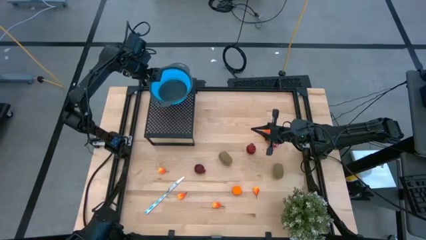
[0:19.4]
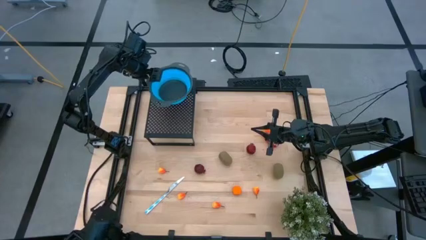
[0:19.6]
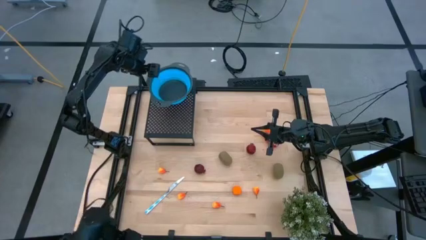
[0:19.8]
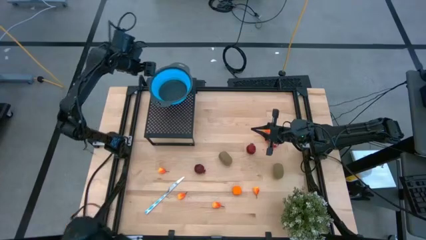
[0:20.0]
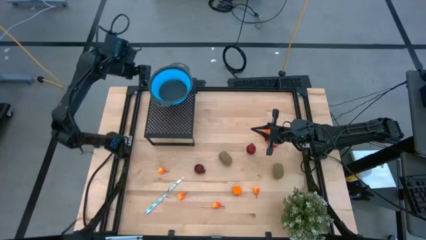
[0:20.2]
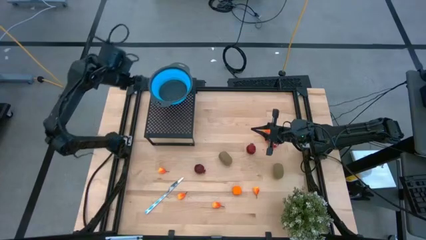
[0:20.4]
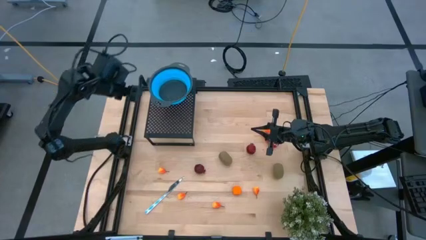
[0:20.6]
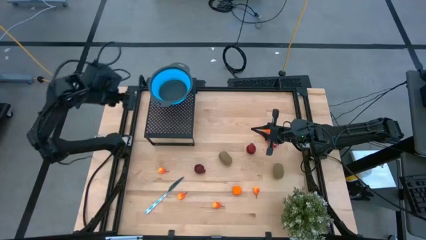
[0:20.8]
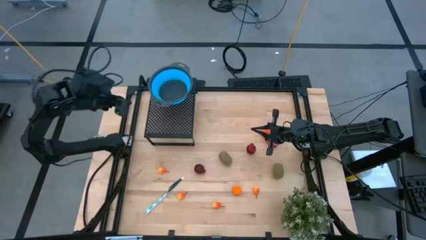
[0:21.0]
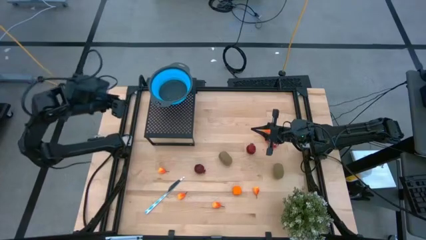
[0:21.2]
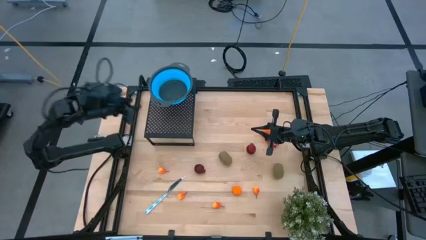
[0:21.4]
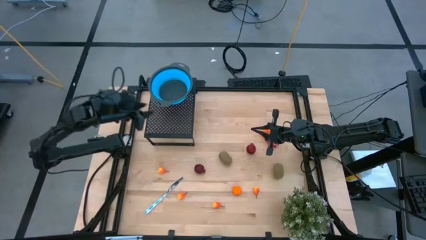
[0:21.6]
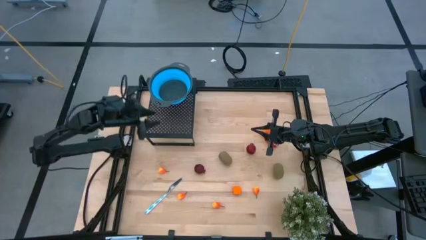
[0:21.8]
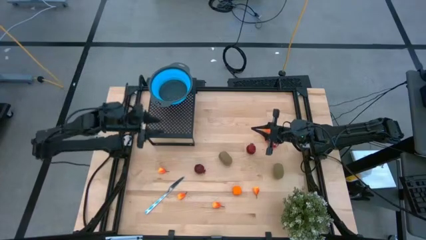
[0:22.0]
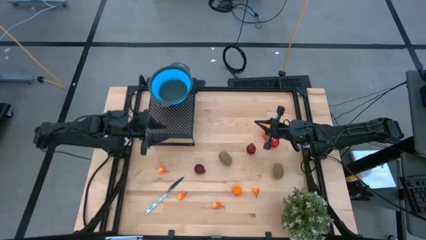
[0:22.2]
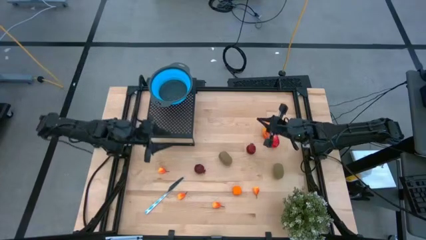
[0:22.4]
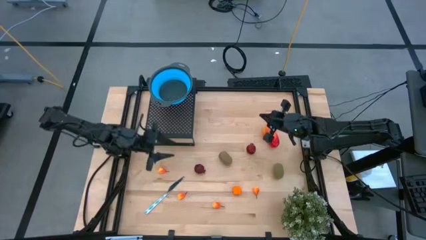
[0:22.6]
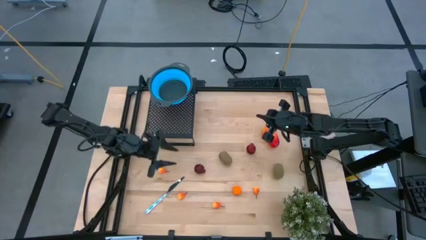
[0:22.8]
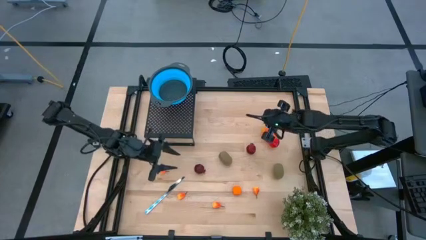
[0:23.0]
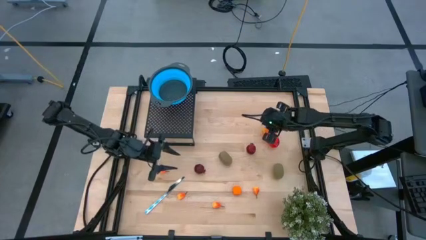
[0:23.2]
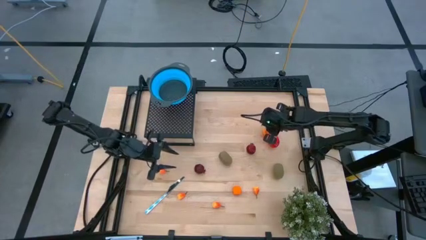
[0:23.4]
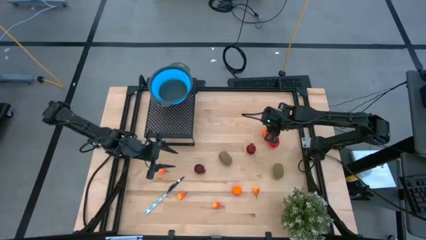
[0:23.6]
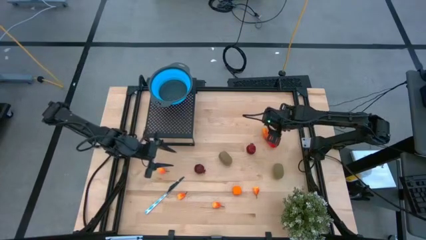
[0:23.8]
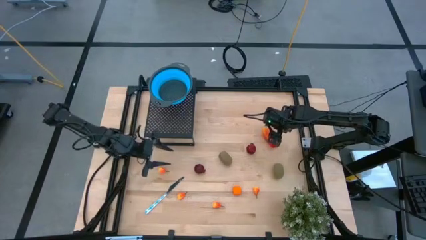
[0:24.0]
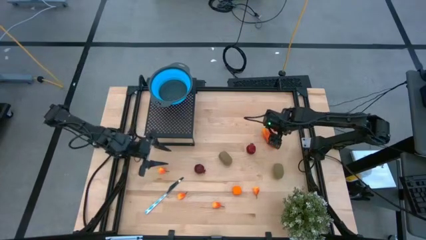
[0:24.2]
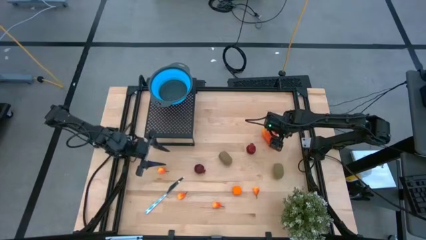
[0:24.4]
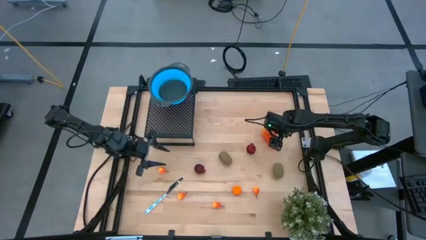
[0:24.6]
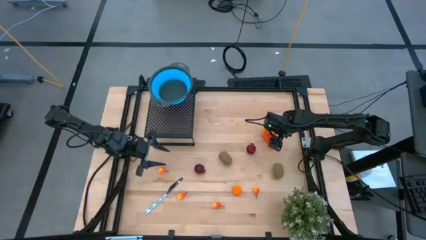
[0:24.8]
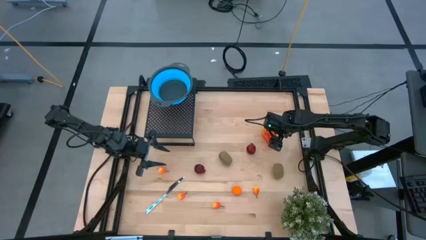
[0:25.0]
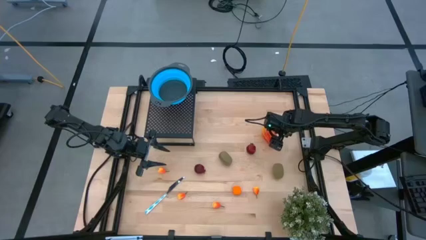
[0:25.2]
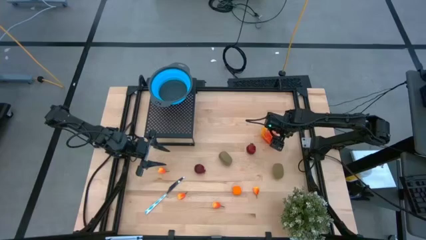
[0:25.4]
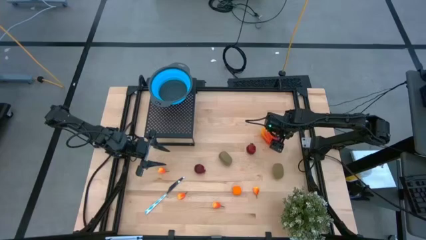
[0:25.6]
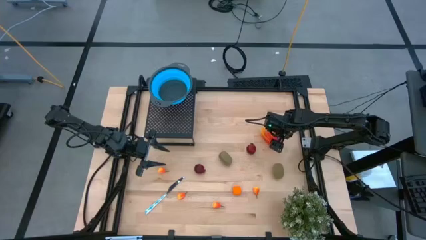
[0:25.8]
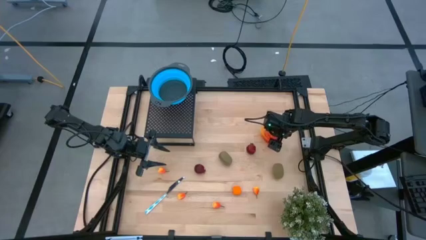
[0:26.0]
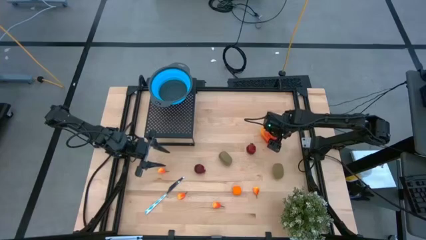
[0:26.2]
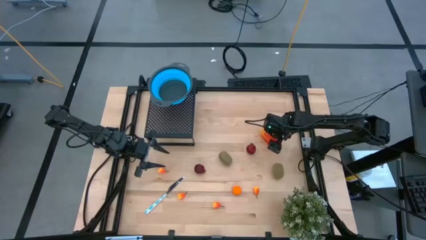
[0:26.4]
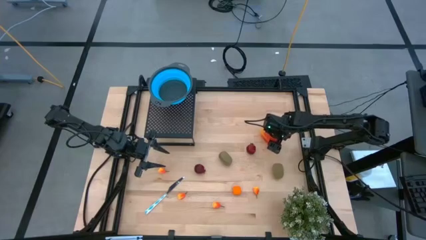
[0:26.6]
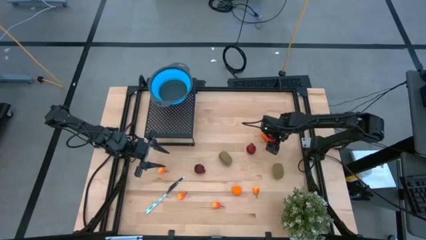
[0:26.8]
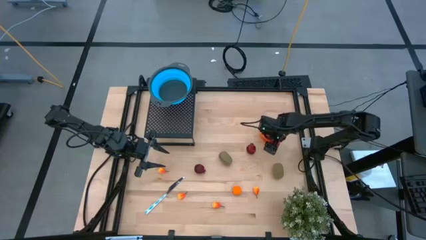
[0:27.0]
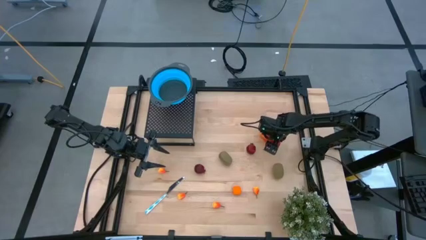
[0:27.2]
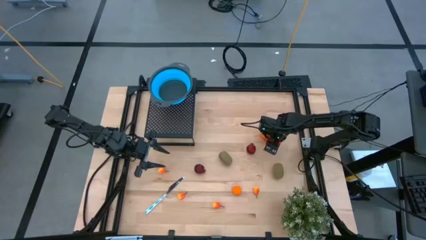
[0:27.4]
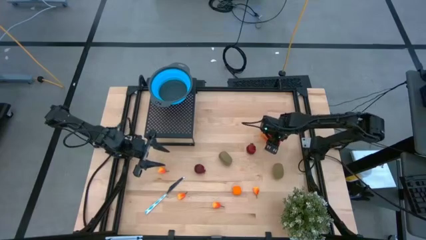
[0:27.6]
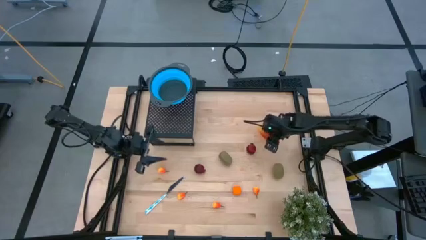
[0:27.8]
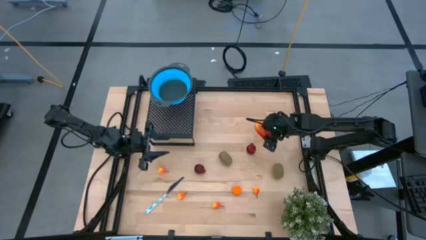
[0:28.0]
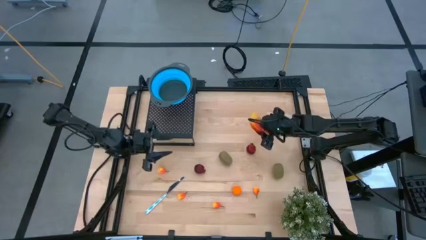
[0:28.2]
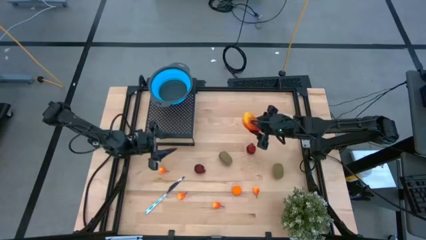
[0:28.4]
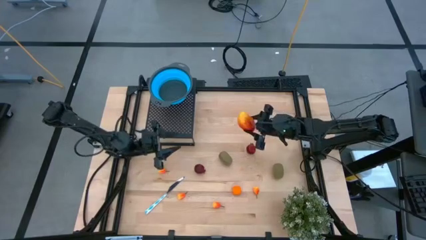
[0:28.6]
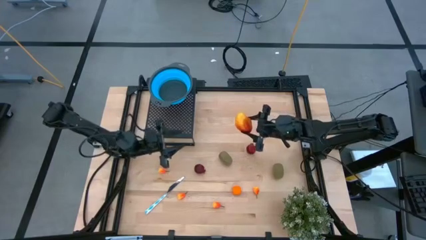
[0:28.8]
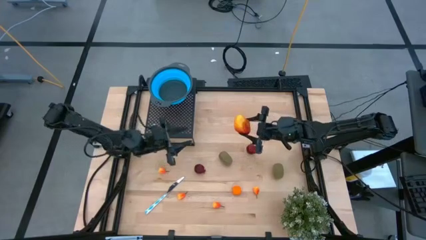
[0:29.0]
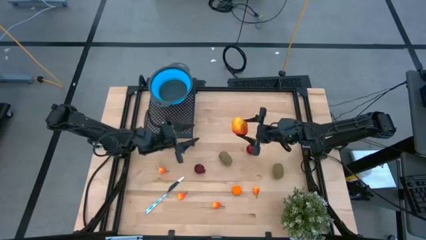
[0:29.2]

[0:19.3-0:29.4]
Task: Pick & Place Fruit
Put the orange mango into the blue strainer bowl on the shelf

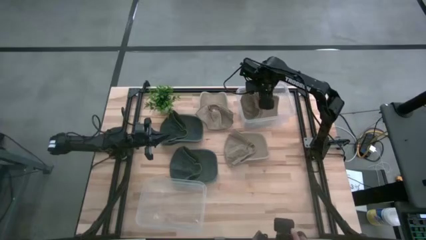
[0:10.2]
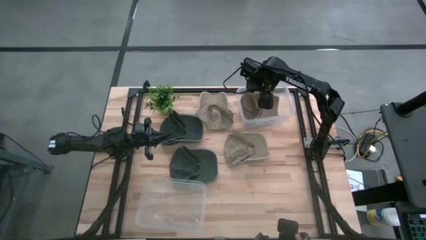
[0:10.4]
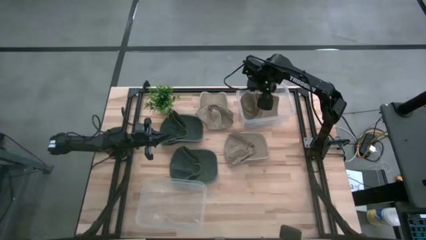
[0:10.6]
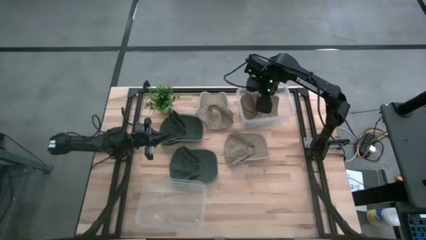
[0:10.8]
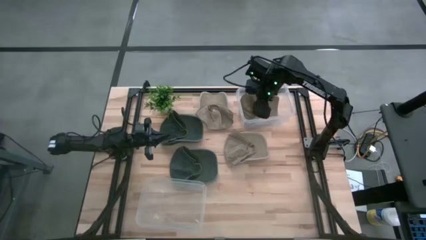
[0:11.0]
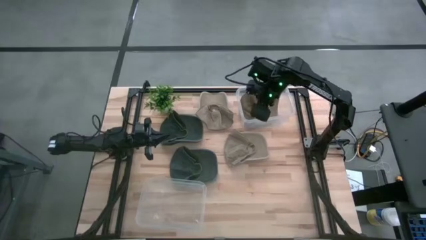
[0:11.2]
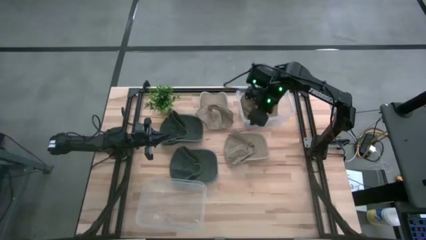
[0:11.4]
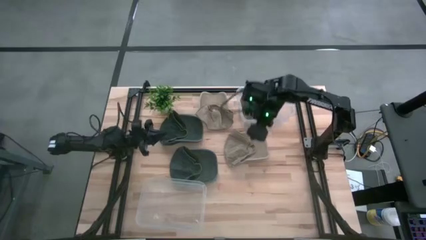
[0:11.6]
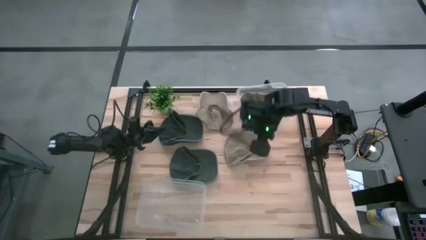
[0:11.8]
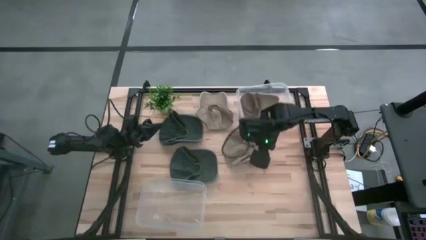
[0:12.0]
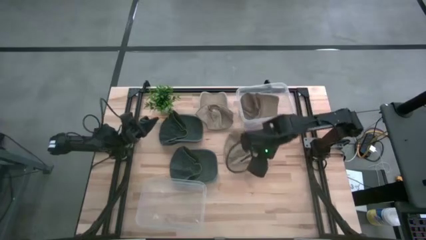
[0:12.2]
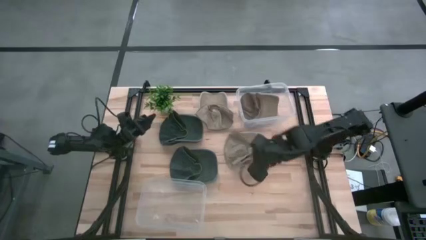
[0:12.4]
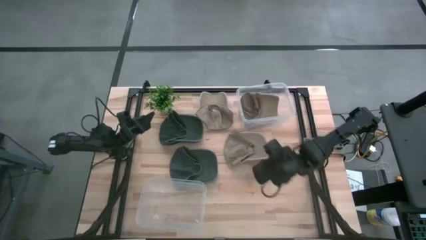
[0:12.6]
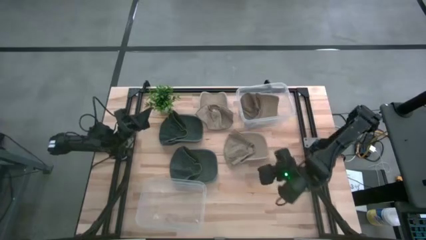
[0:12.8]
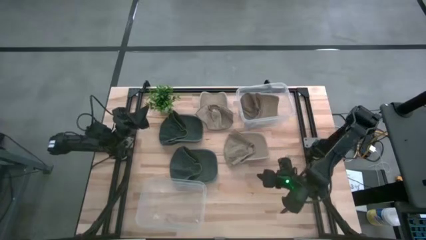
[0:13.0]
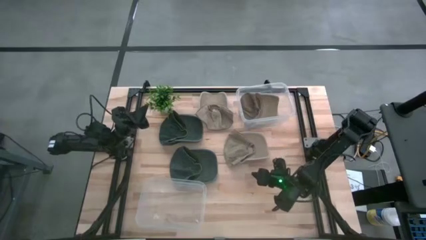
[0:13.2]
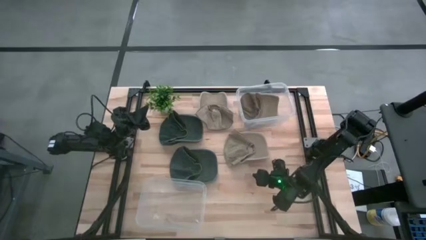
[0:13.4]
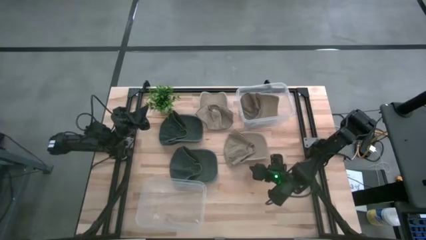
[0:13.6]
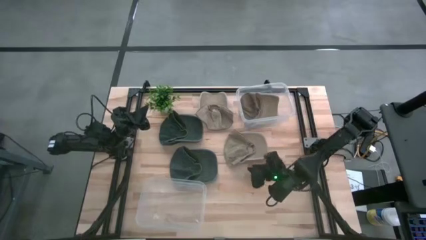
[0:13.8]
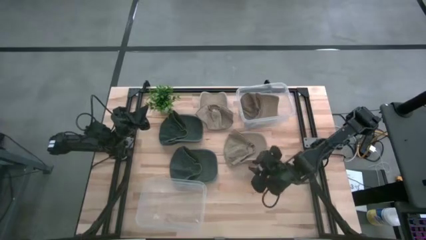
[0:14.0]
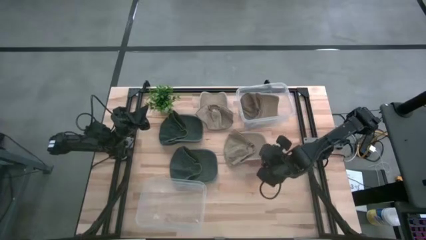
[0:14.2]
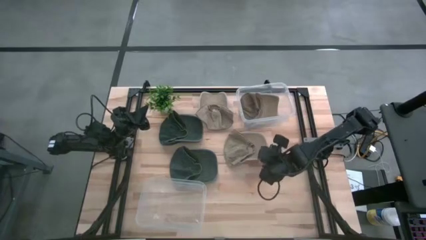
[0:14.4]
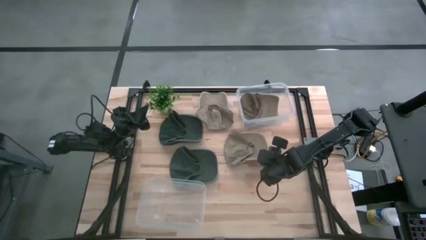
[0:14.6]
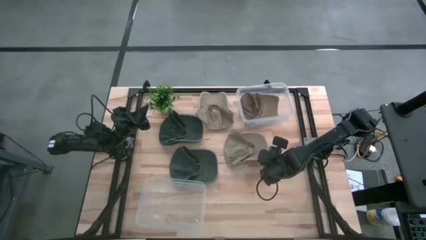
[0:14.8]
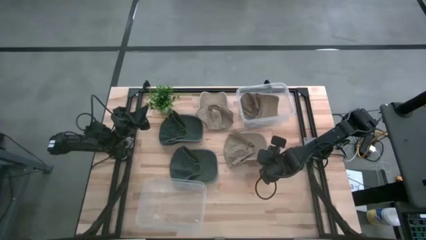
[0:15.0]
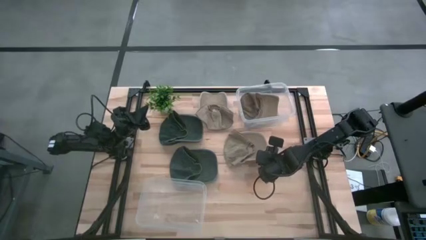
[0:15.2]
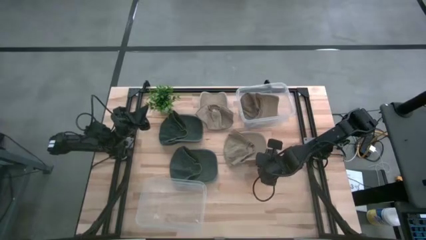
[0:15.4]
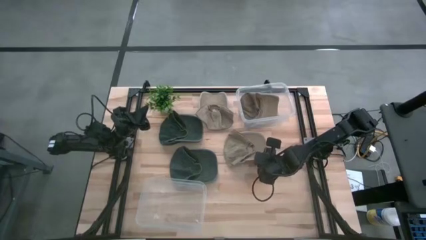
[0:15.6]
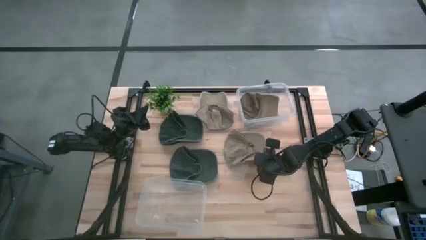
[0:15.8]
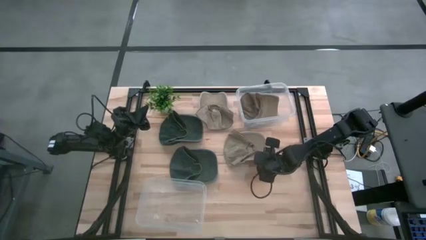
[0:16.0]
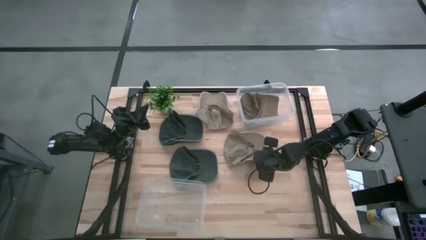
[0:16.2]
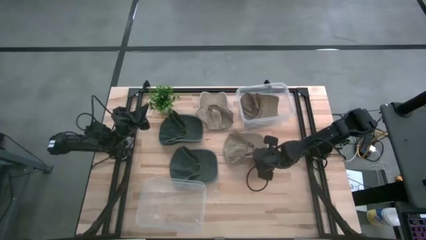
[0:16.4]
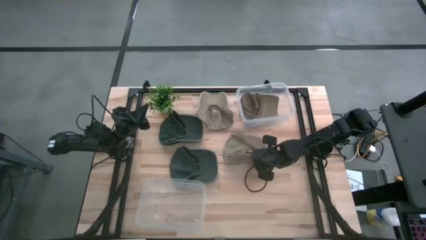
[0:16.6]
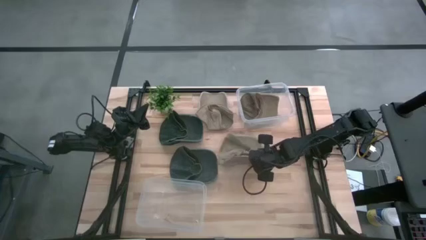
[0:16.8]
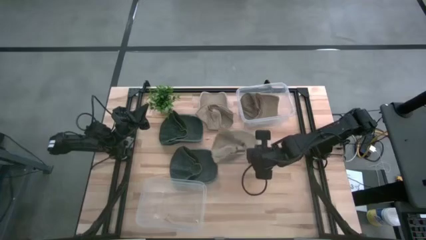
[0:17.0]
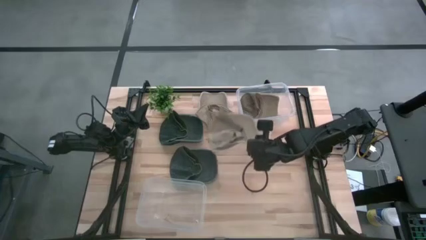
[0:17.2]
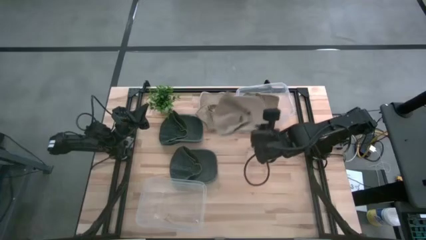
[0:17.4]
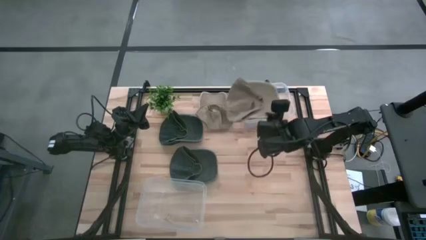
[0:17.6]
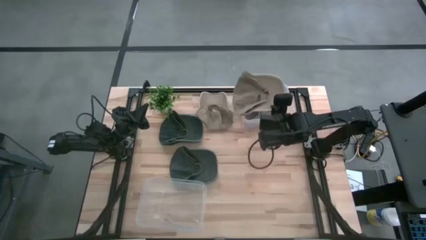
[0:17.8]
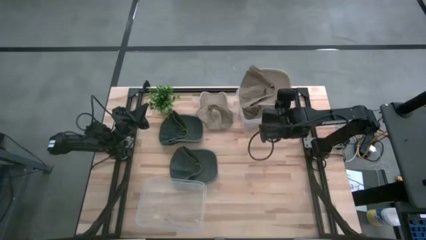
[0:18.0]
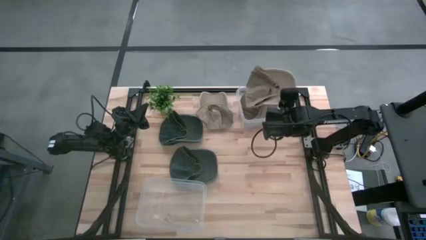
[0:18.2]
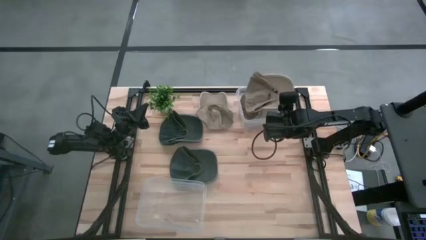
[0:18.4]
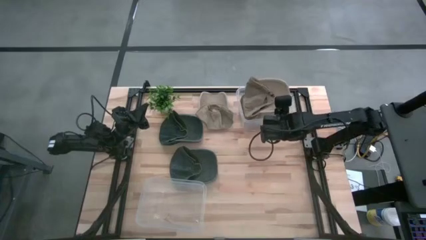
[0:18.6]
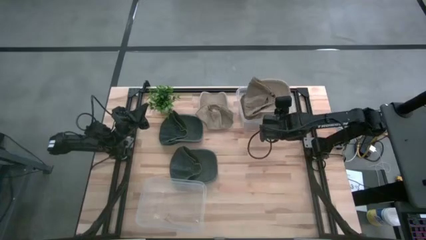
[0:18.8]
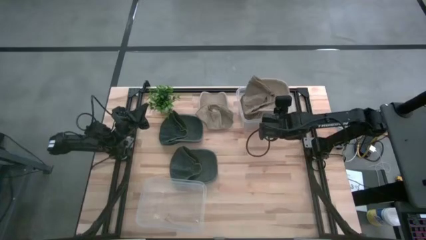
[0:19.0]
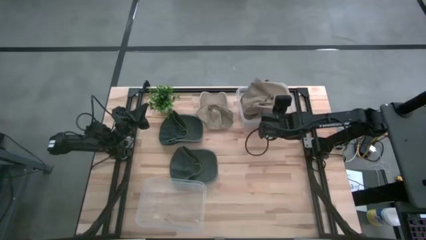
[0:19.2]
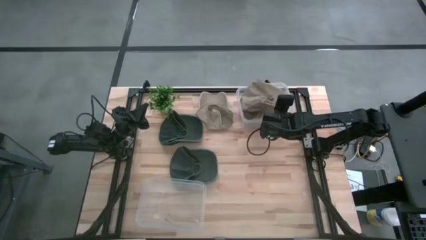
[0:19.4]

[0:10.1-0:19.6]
Task: Pick & Place hat
Put the middle brown cap into the top transparent bin
